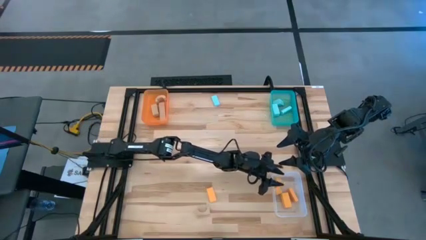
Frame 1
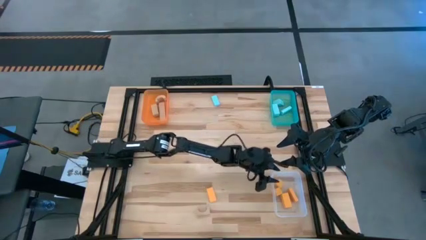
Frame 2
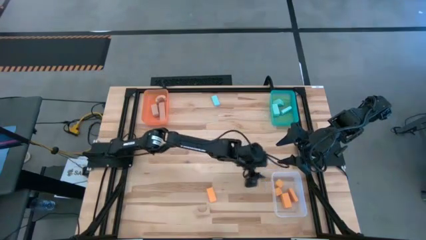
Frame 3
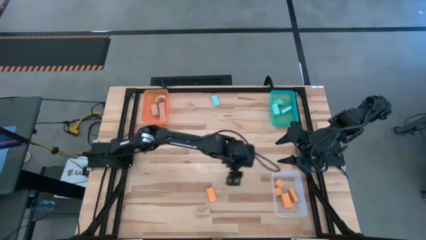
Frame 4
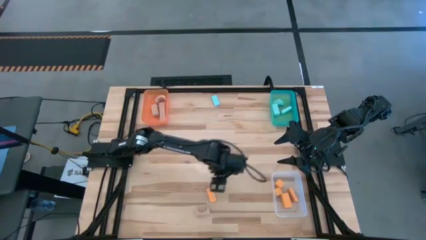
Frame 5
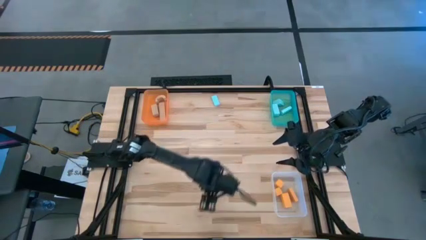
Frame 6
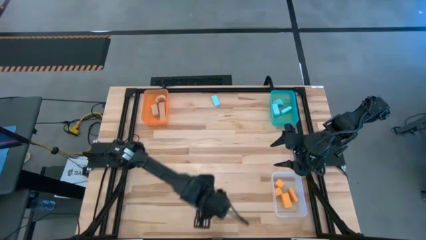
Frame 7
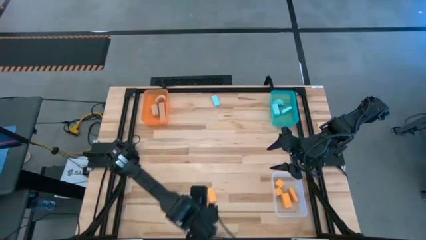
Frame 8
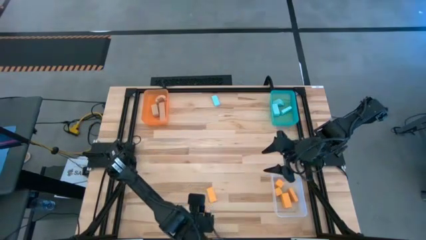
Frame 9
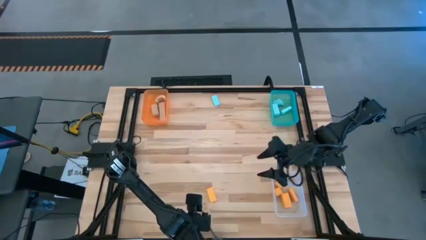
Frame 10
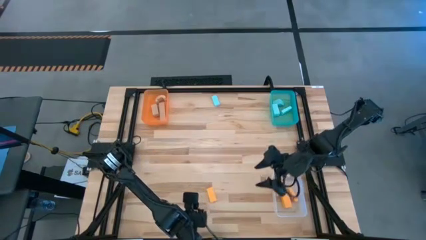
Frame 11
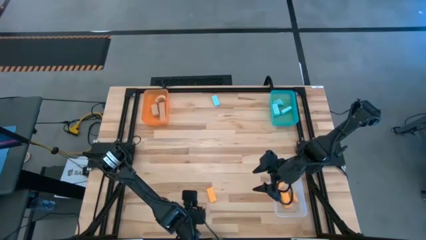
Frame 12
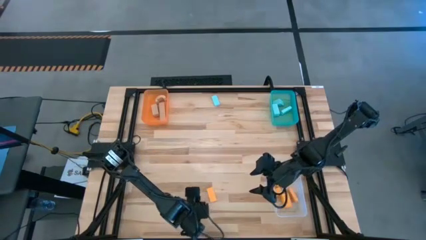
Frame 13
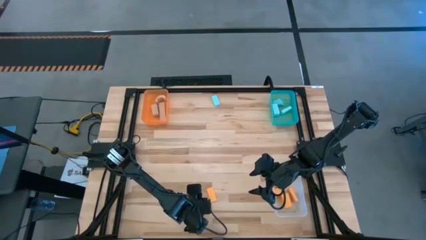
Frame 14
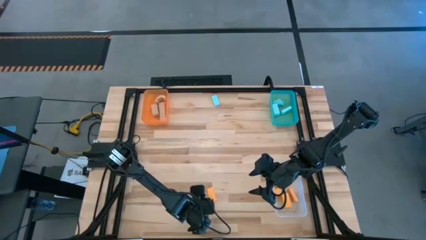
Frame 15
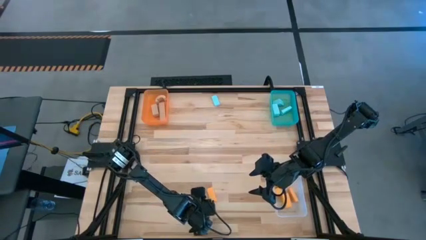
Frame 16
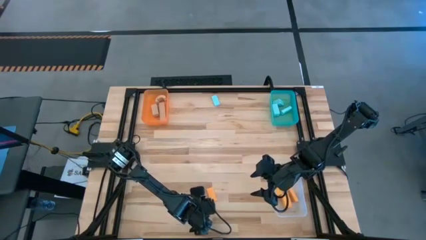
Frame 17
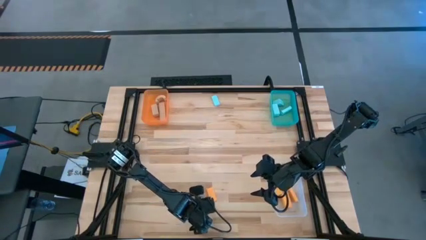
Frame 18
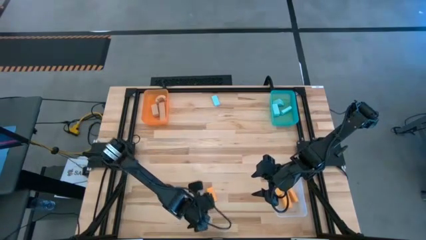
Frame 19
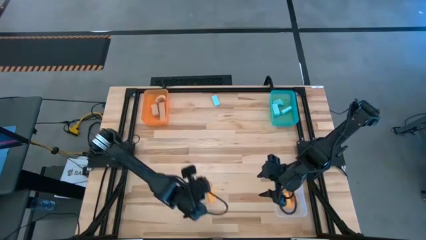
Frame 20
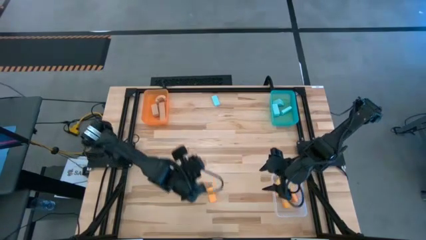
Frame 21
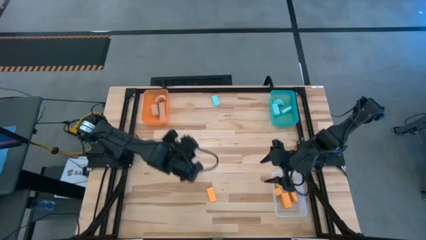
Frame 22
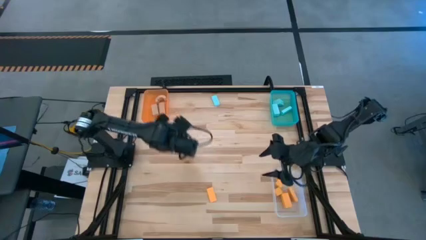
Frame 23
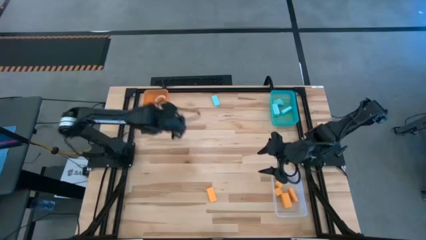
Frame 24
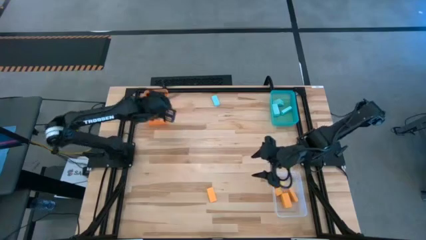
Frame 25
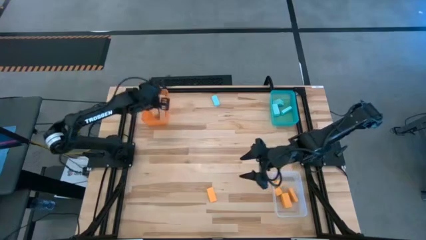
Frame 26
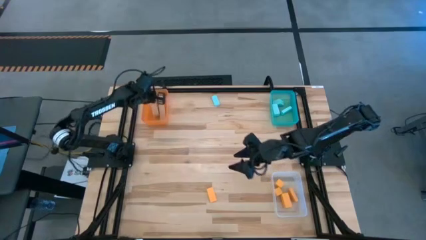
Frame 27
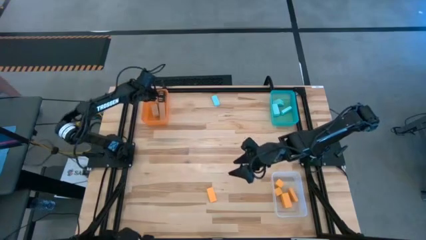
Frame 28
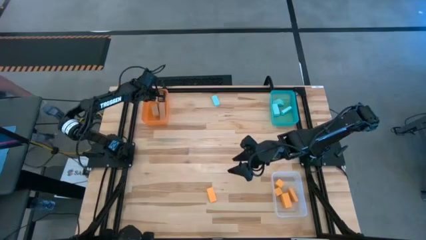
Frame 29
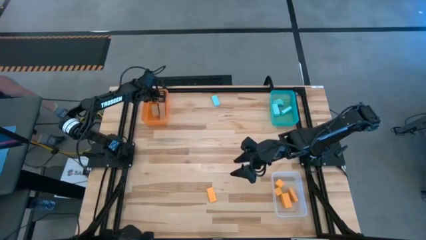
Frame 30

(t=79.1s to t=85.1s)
Task: Sort & place blocks by color
Put the brown block into the orange bin

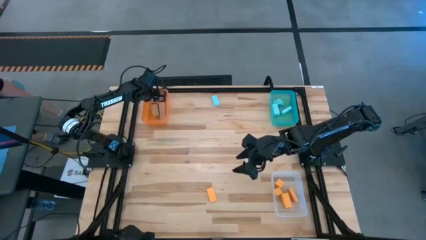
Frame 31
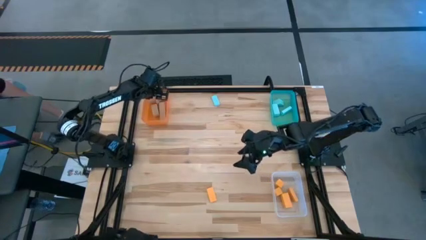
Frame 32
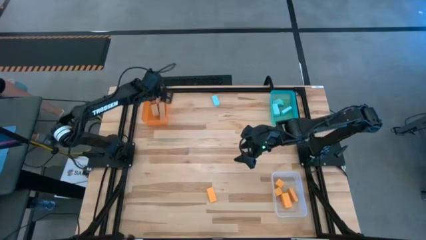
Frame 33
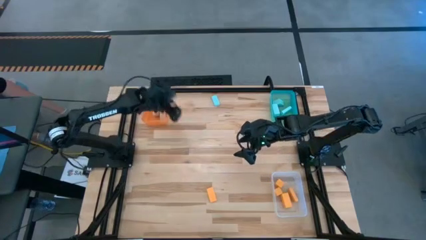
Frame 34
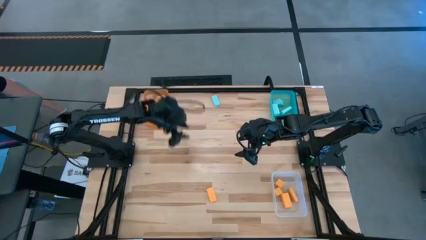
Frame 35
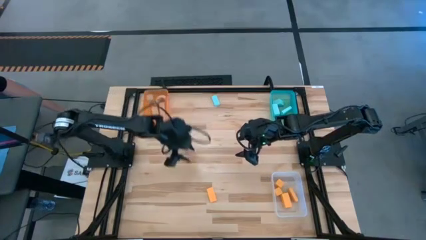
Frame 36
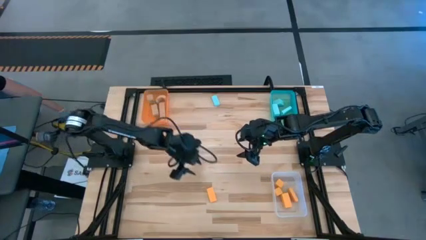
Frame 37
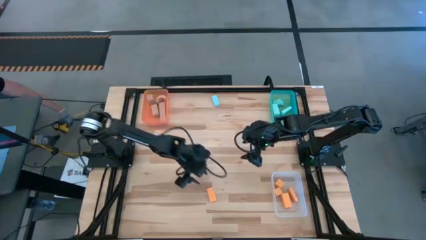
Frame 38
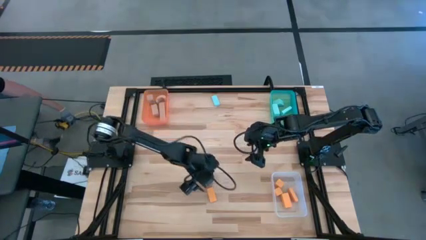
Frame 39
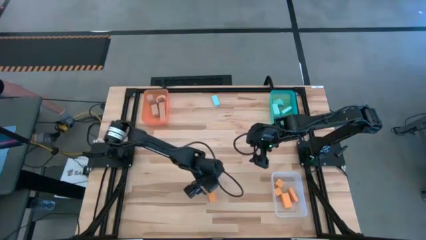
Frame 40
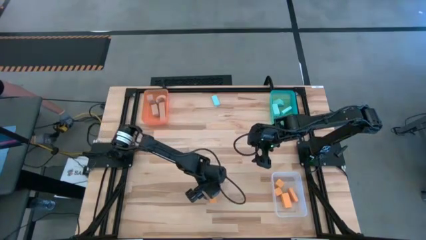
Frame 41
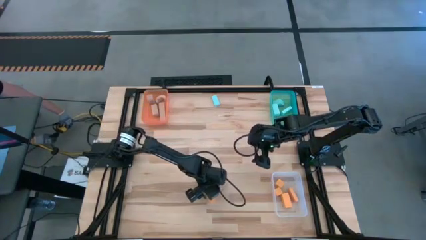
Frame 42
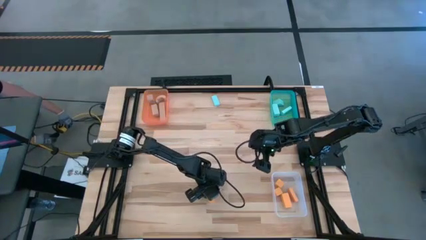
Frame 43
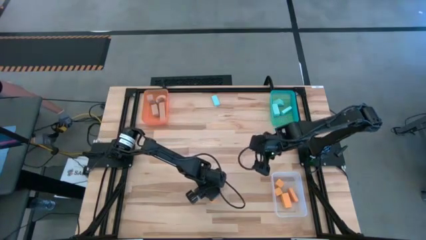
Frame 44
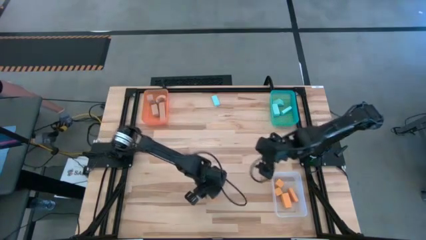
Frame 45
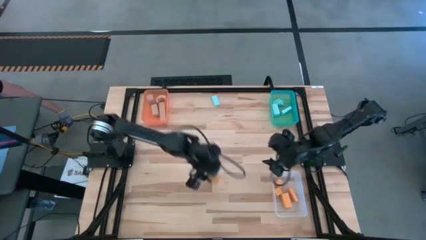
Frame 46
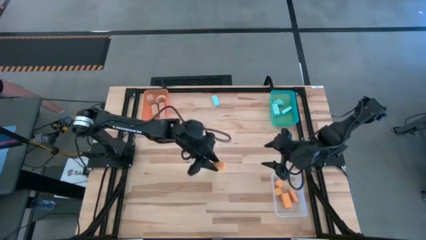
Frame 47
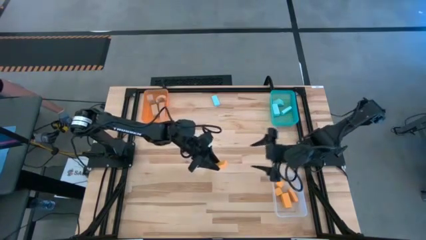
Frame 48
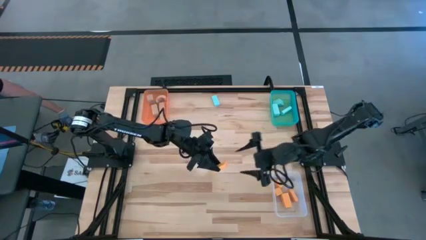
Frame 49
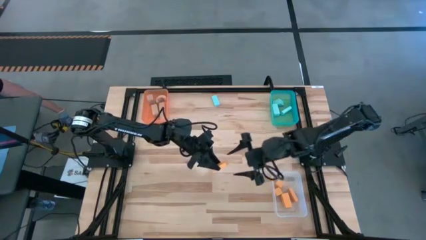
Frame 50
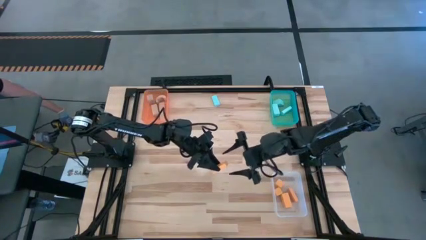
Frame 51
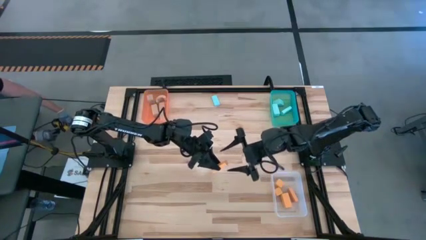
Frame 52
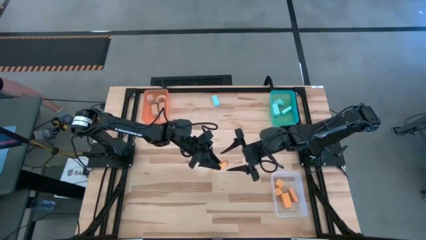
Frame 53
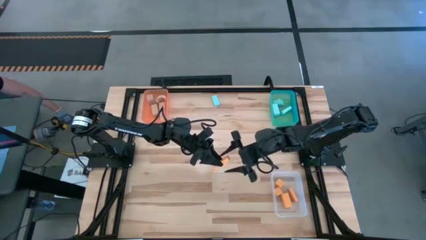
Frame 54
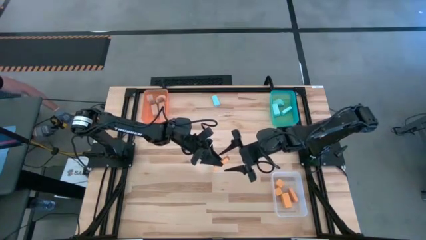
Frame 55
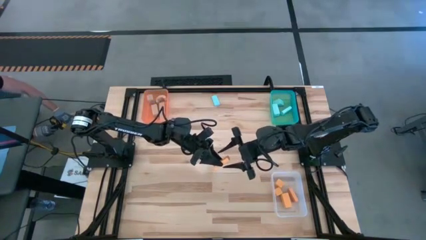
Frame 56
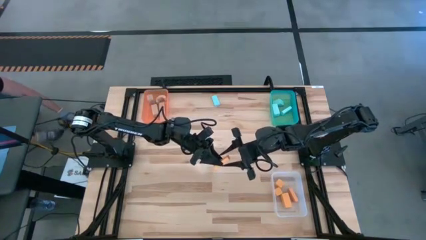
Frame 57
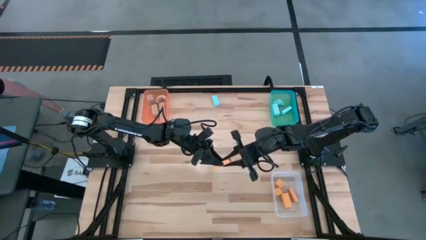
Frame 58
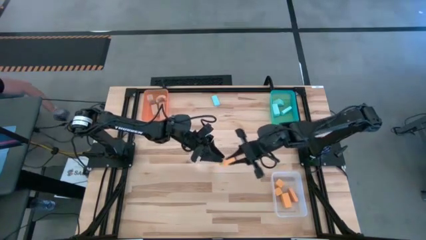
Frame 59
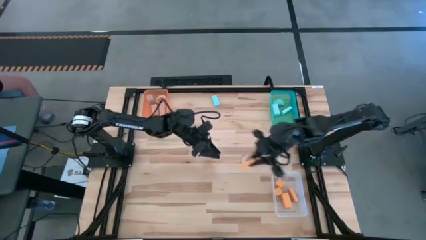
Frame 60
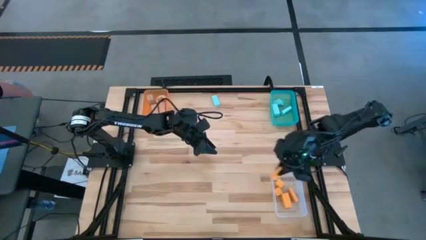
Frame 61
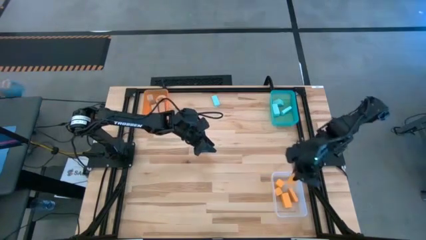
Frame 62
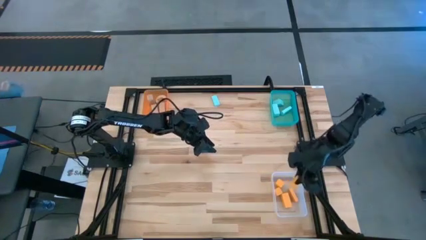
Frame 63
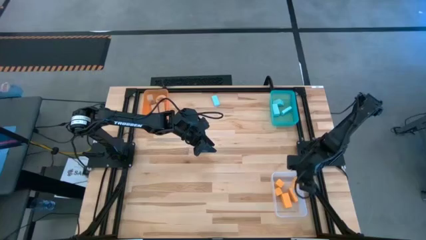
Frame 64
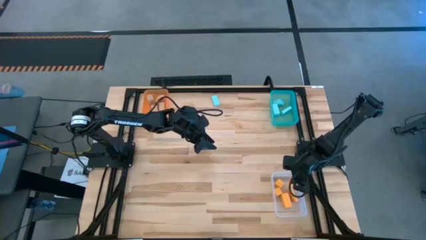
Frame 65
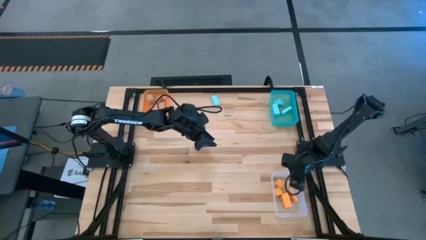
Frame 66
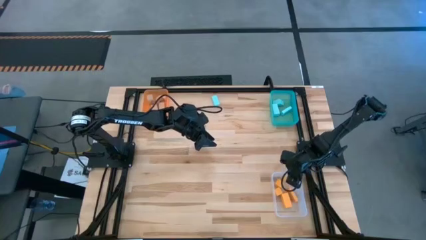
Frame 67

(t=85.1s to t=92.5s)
Put the orange block into the white bin

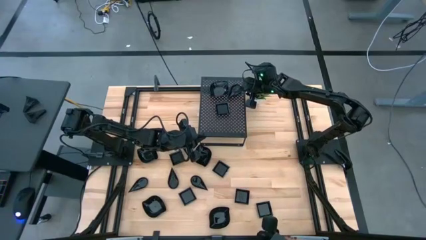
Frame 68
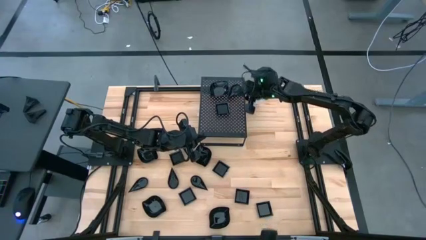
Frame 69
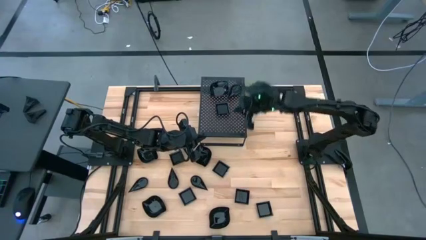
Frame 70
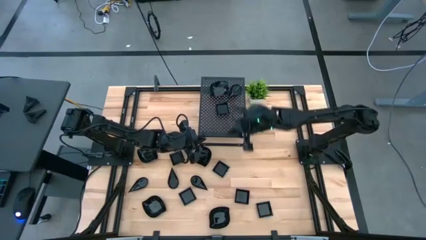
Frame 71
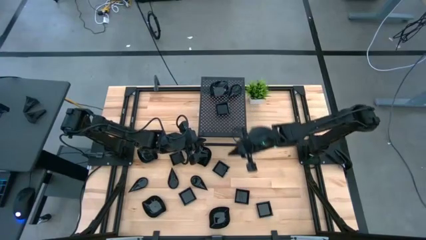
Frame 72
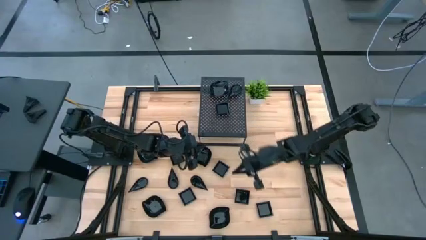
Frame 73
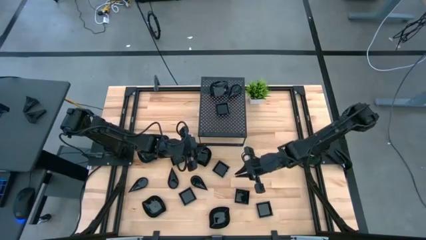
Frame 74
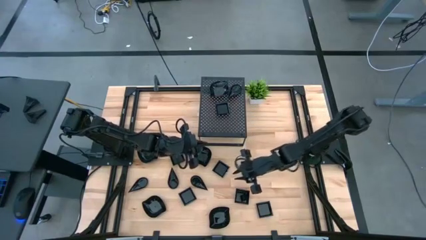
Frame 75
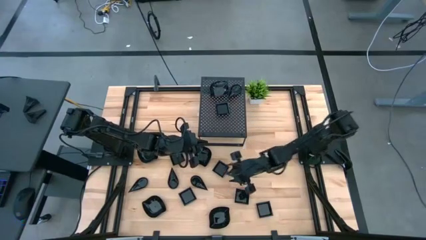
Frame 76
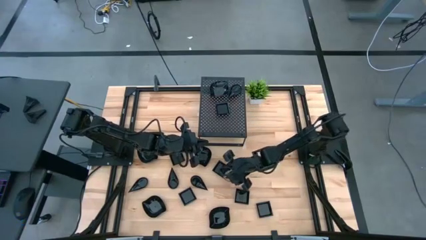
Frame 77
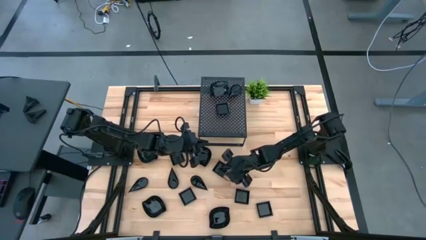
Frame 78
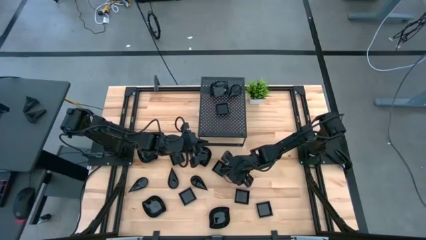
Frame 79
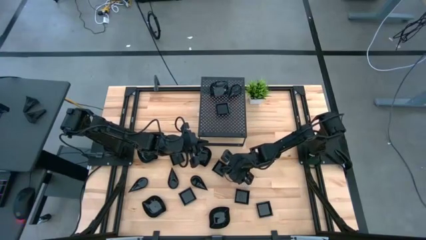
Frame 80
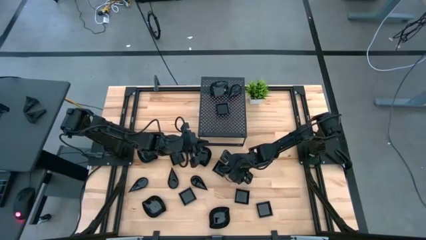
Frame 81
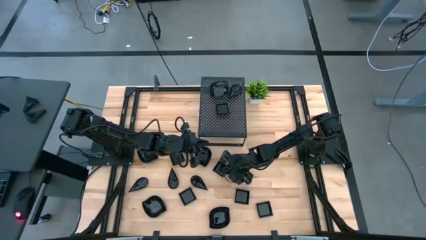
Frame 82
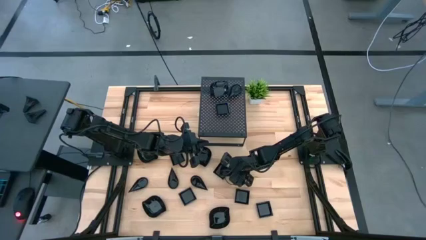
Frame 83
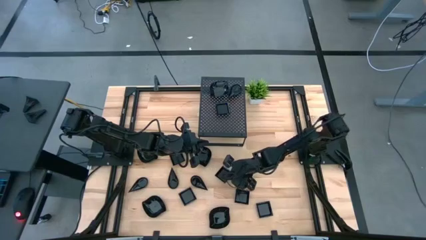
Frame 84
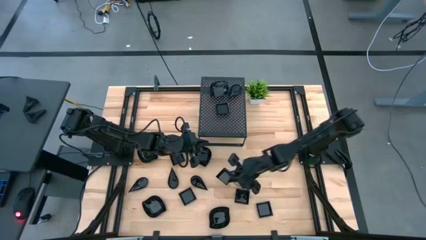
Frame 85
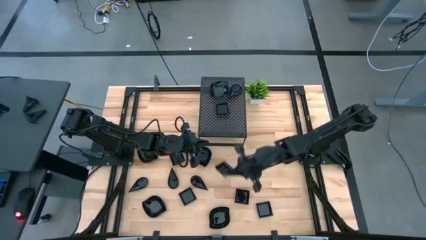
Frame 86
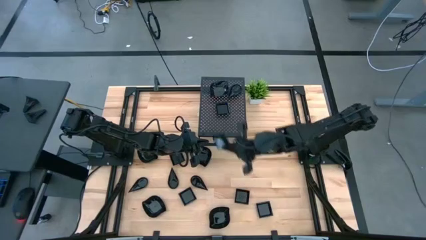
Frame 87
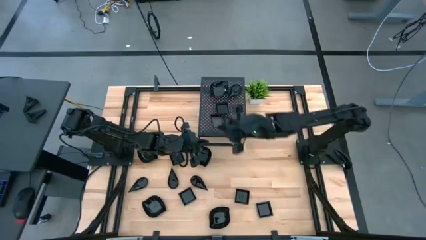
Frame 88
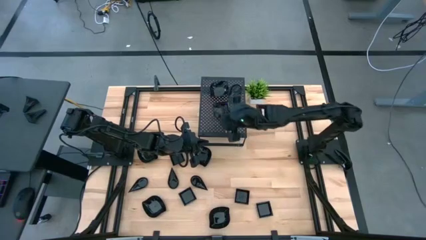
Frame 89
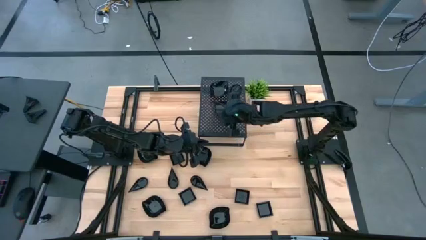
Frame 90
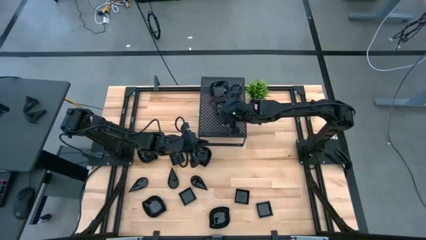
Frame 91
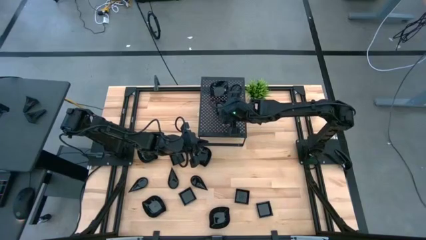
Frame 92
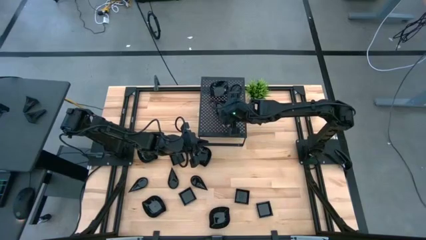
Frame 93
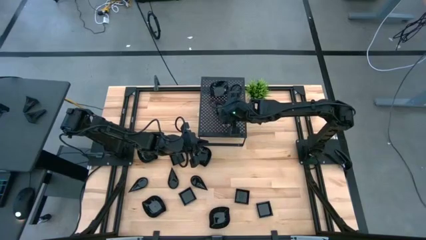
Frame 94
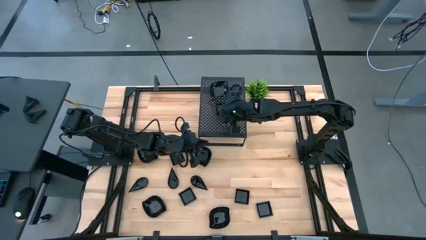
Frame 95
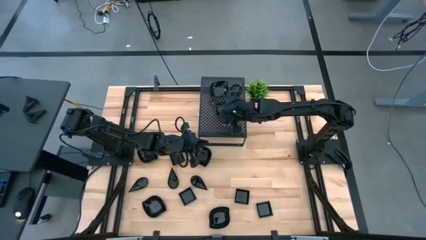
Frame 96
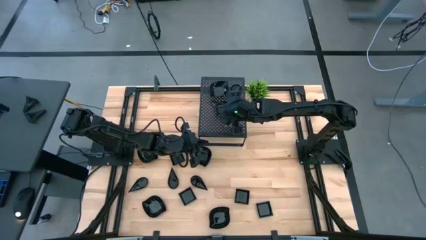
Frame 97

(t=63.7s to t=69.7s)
Task: Pick & Place Mini shaped plates
Stack the black square plate on top of the black square plate on the shelf
